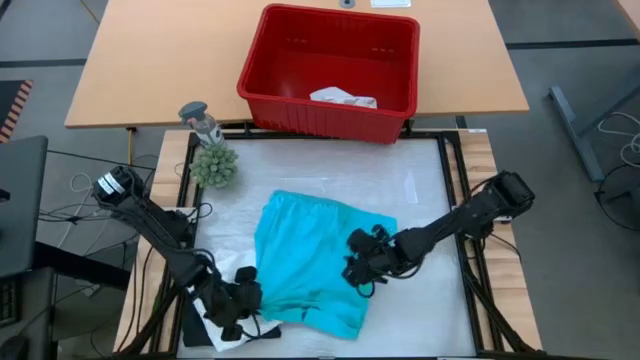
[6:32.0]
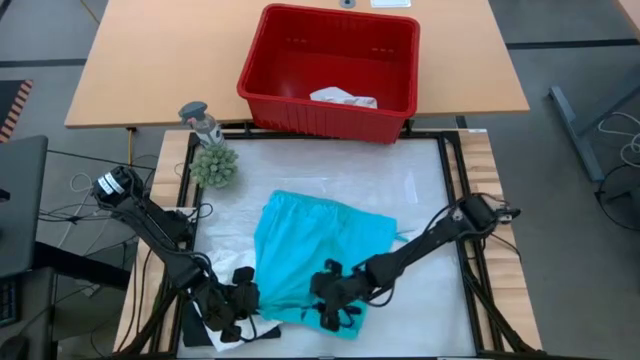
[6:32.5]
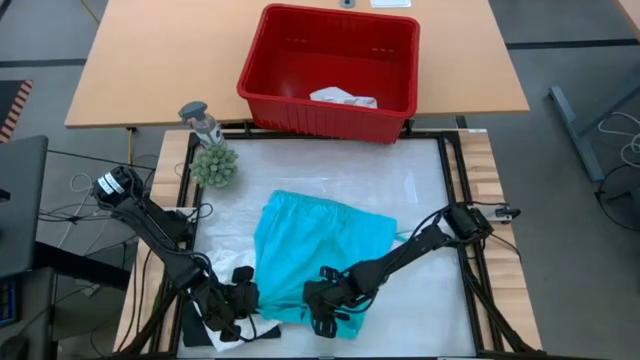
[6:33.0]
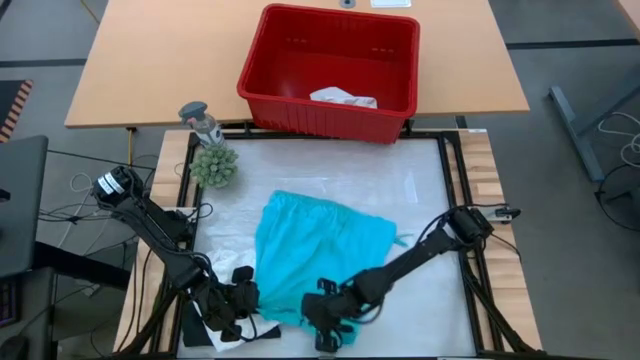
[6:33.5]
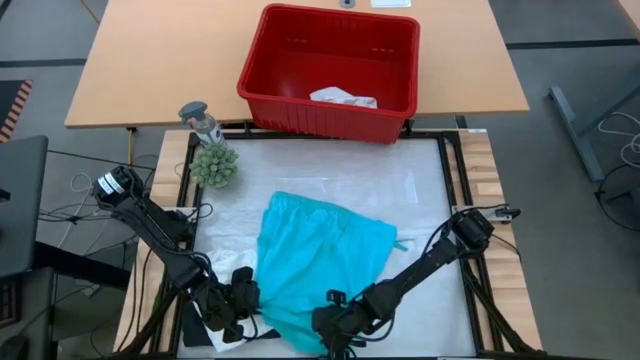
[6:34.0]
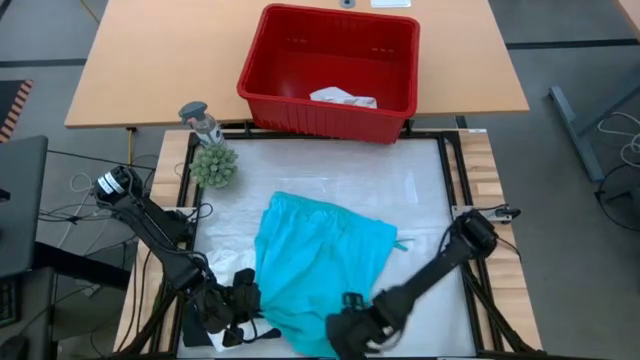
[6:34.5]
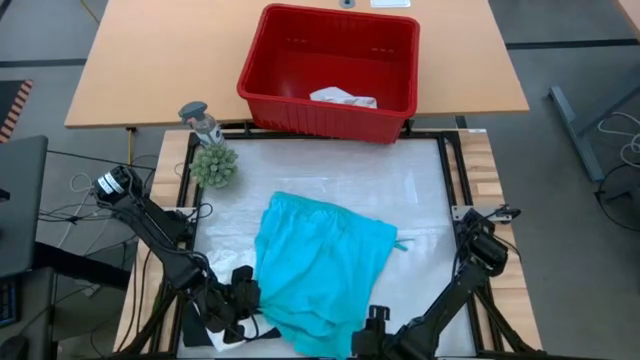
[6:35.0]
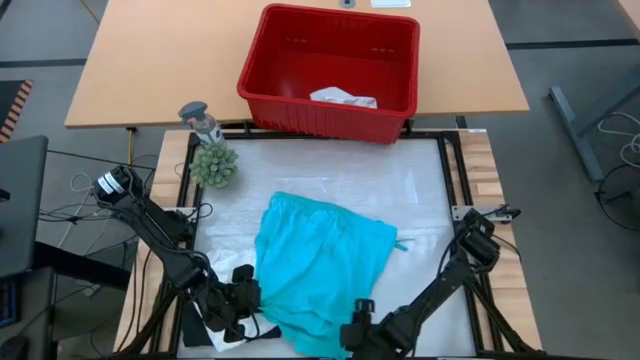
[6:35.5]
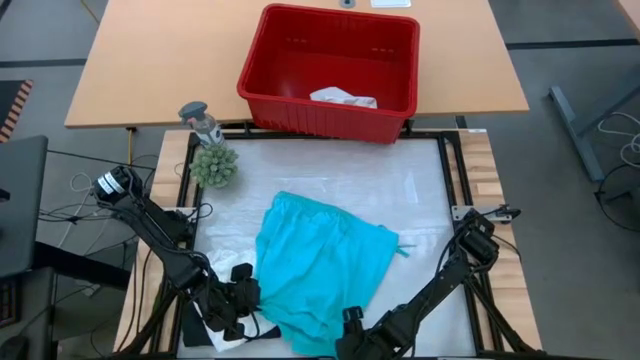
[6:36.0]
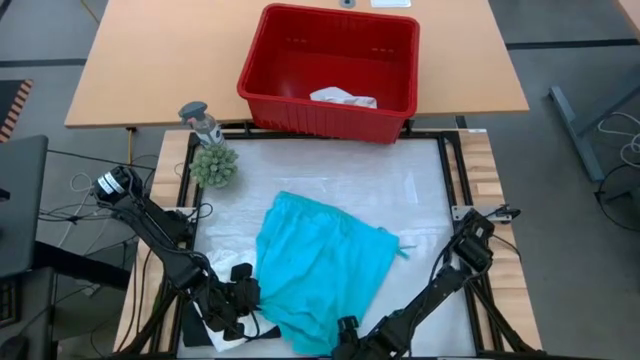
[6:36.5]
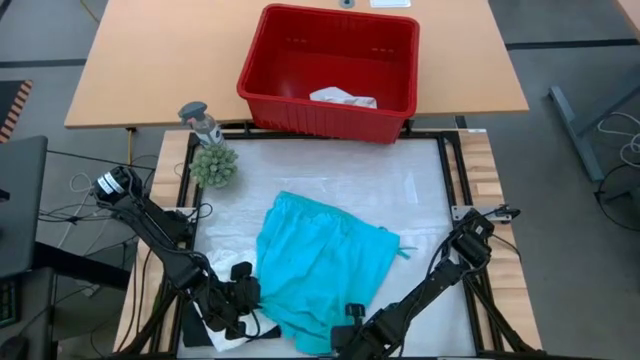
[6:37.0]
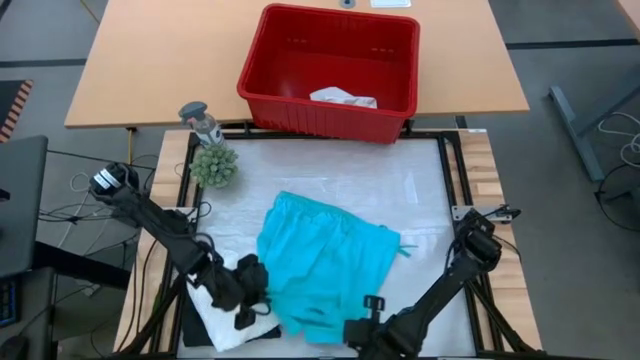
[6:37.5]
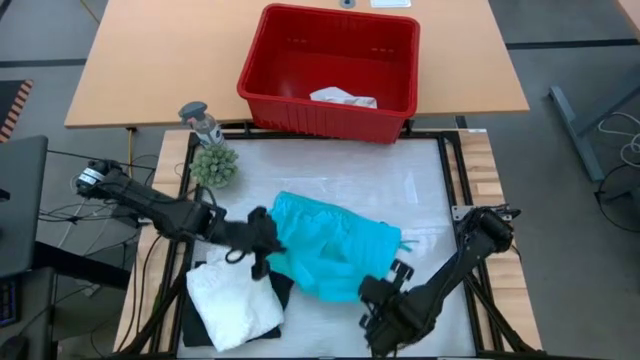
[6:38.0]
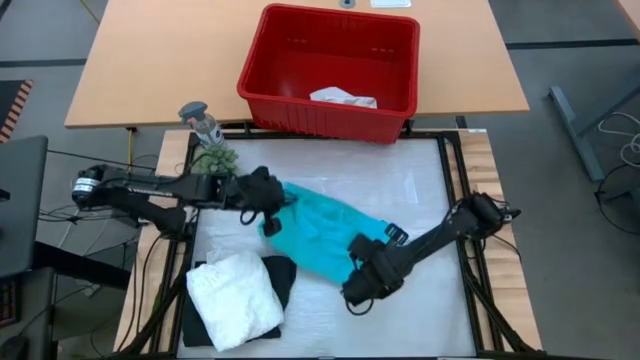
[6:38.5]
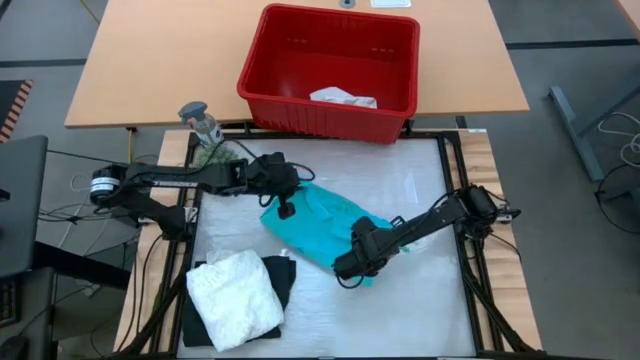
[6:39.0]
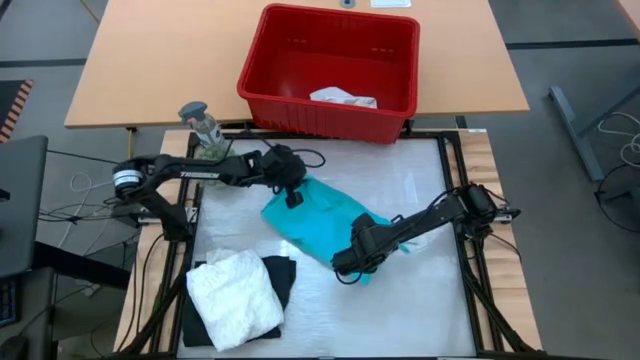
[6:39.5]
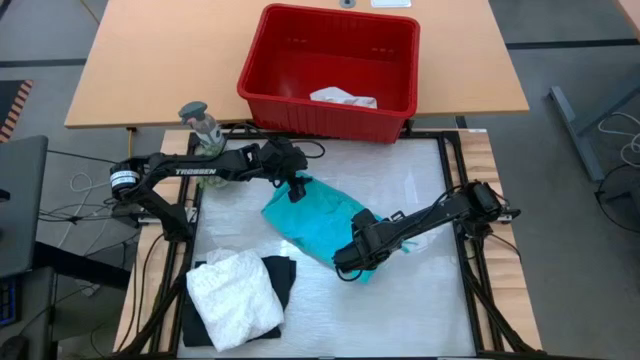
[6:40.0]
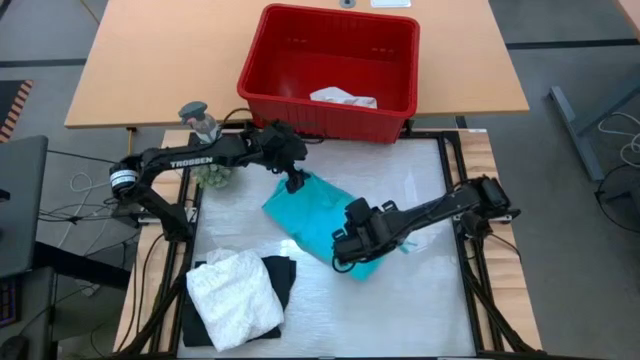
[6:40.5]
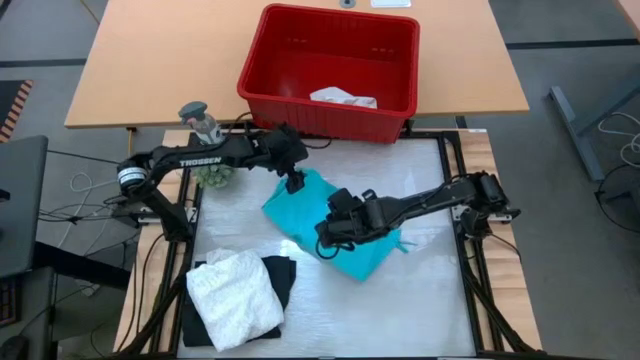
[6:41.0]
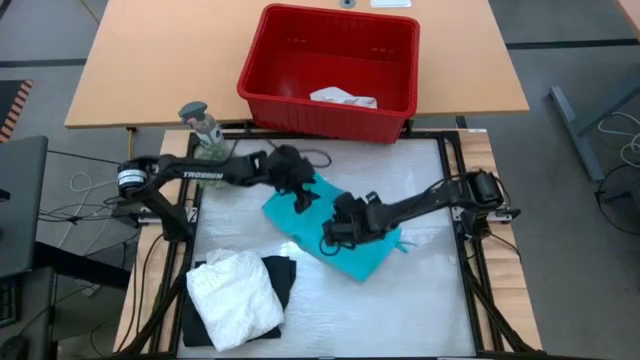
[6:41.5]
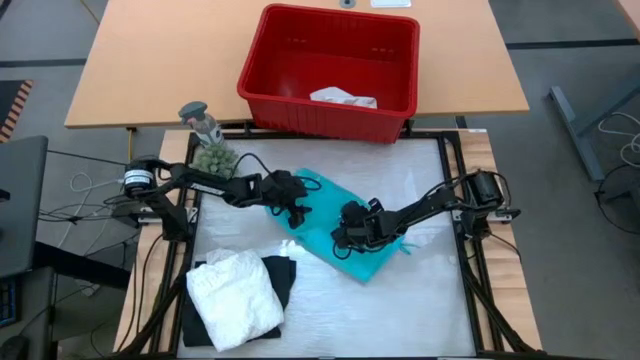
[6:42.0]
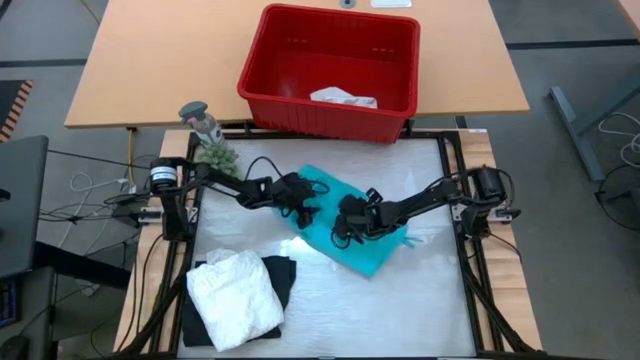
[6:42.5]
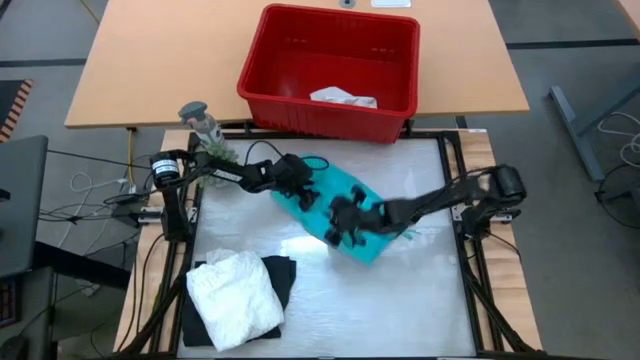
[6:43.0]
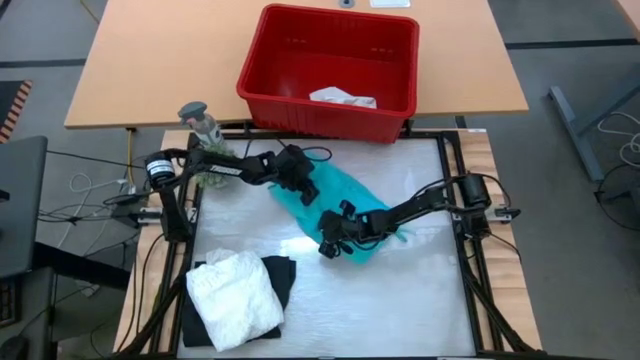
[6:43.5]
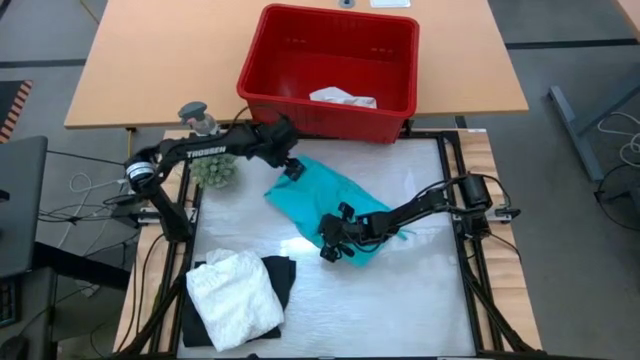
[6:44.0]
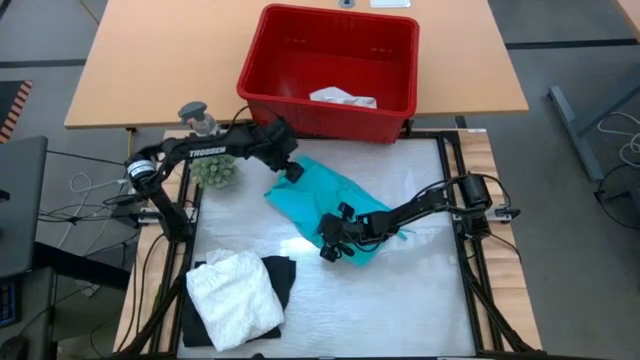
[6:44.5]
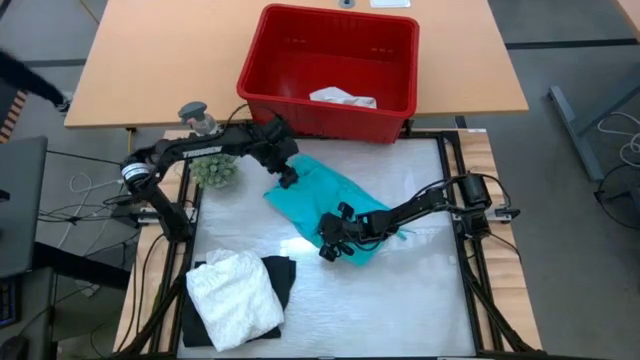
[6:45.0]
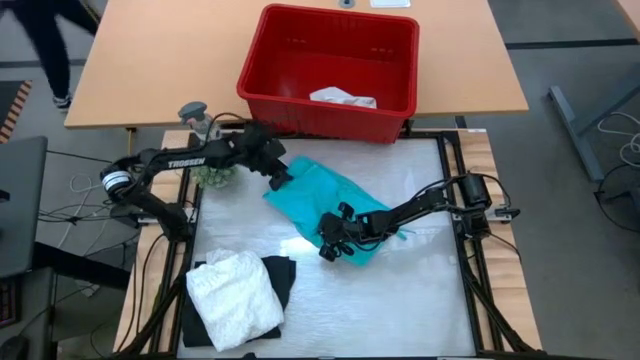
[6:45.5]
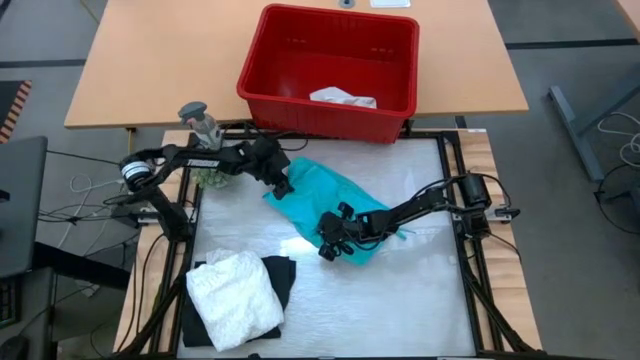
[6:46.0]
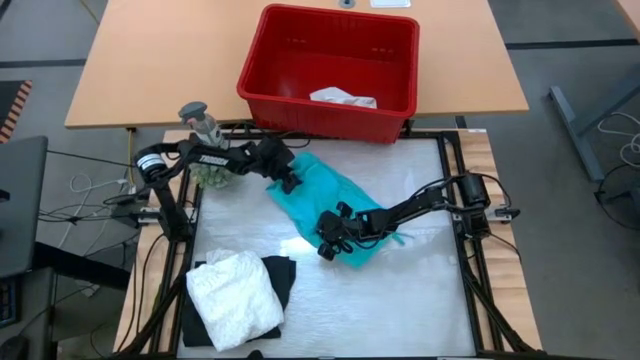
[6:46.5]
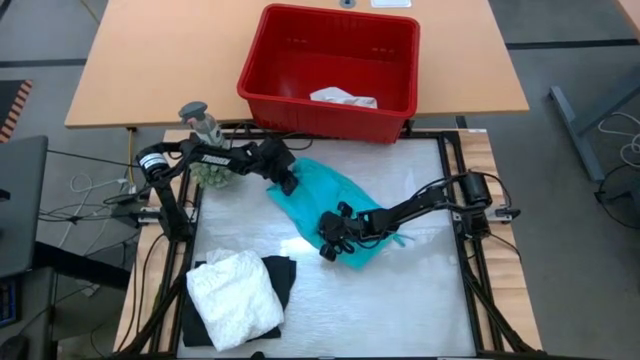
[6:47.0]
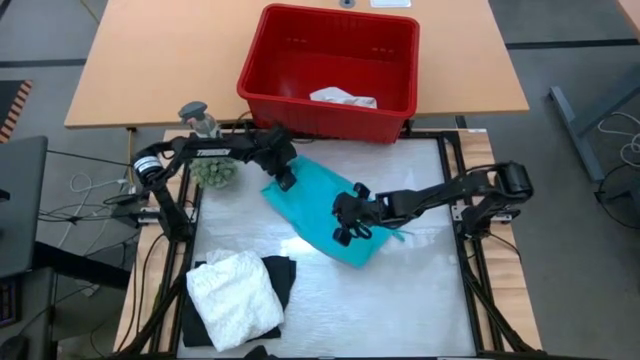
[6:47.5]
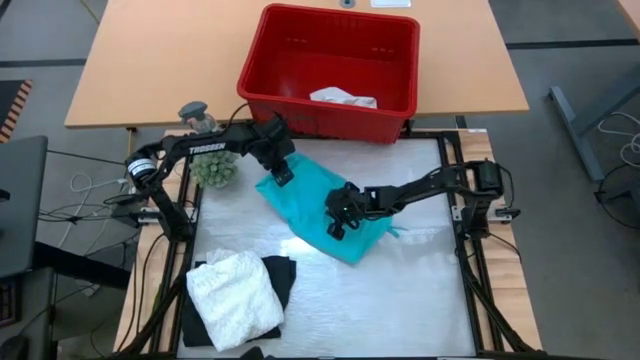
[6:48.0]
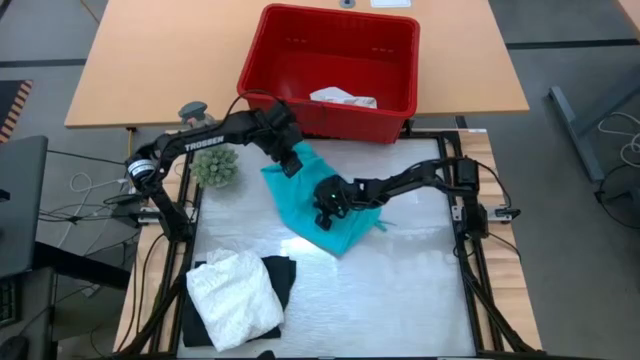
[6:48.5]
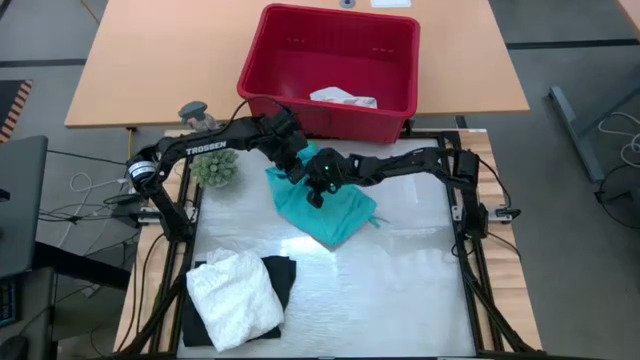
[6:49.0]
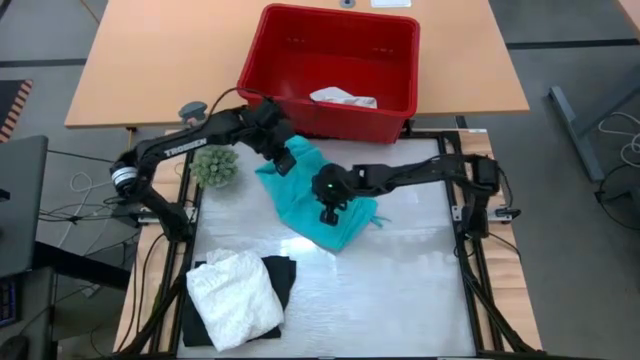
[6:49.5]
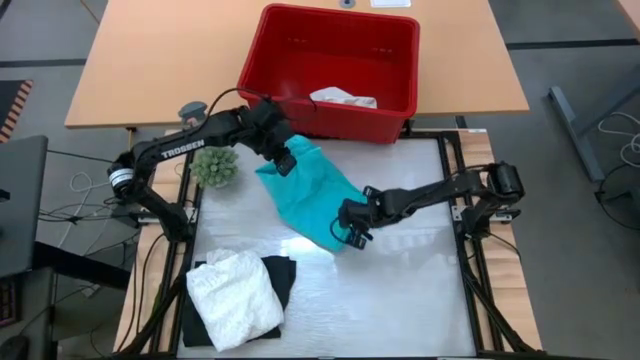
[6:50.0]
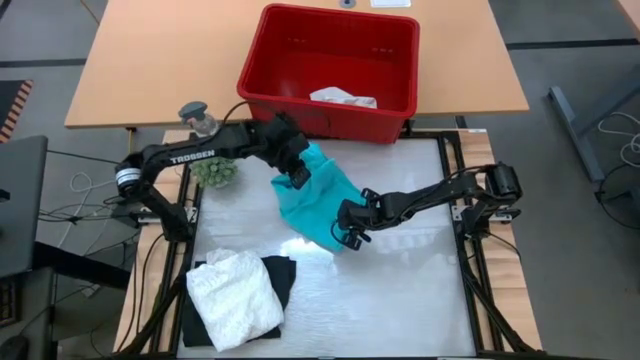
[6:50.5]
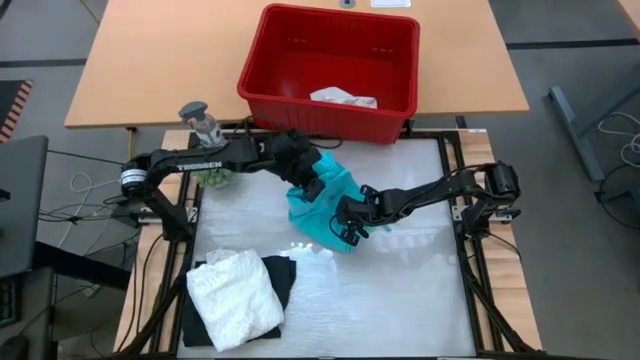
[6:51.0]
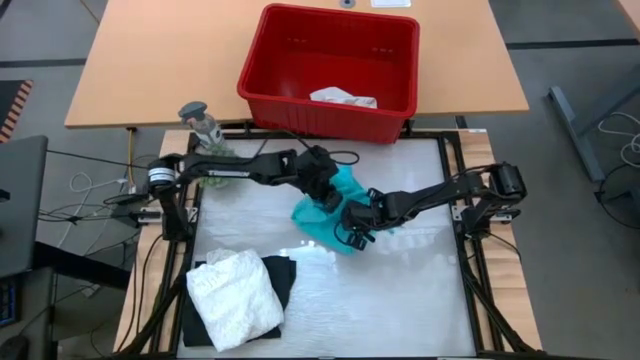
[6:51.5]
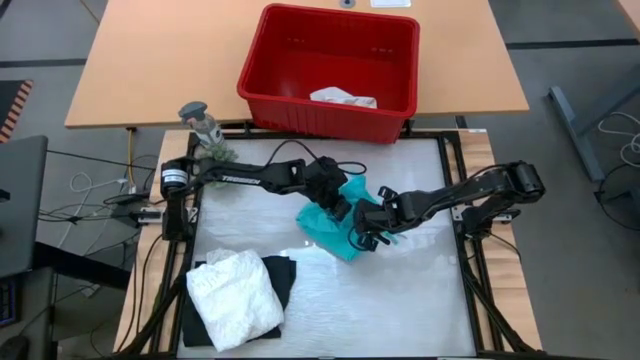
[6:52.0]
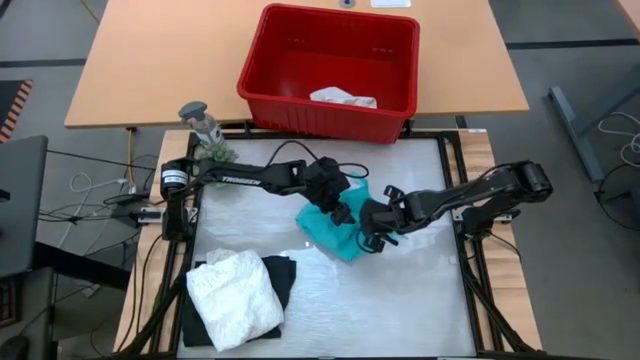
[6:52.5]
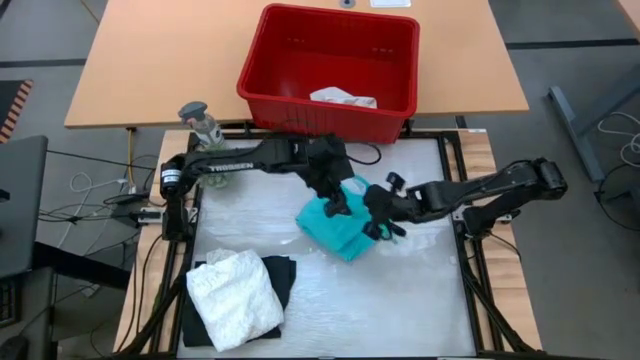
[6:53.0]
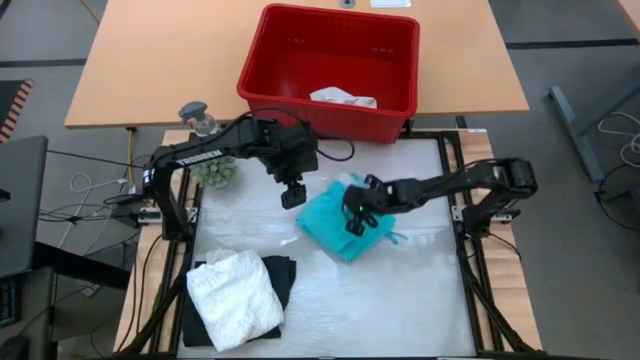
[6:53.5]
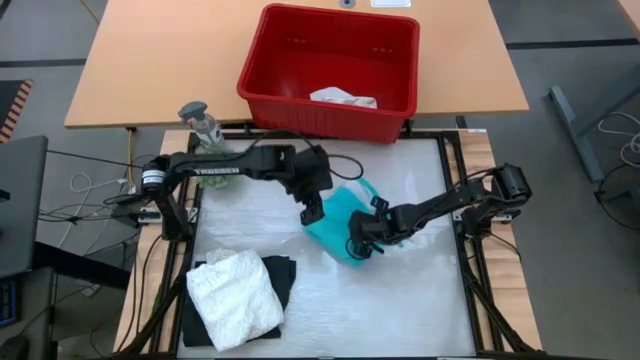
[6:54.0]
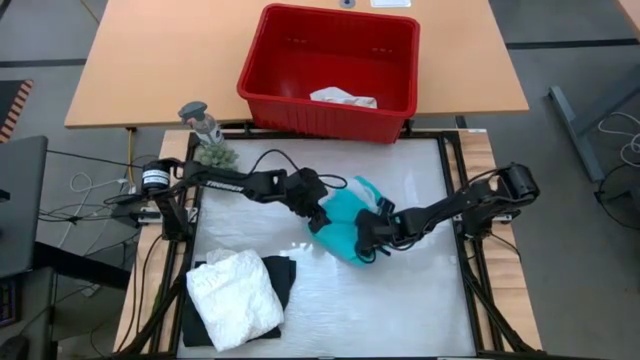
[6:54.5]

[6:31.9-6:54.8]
Task: Fold Laundry from Bin
Fold the blue shorts
